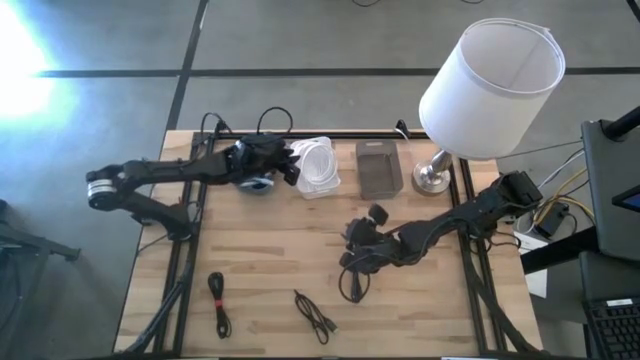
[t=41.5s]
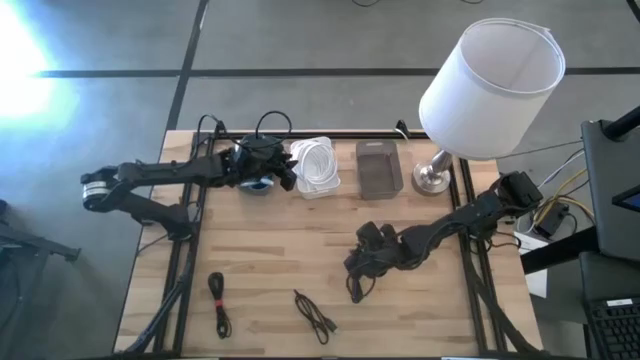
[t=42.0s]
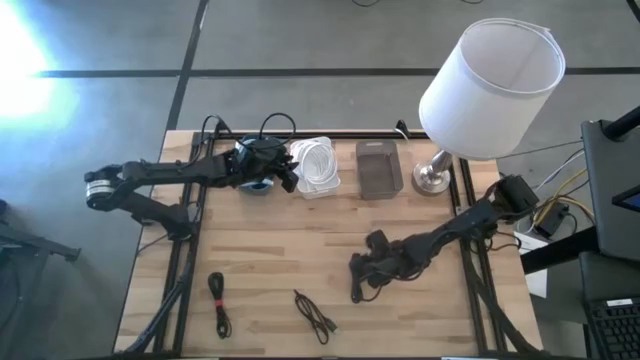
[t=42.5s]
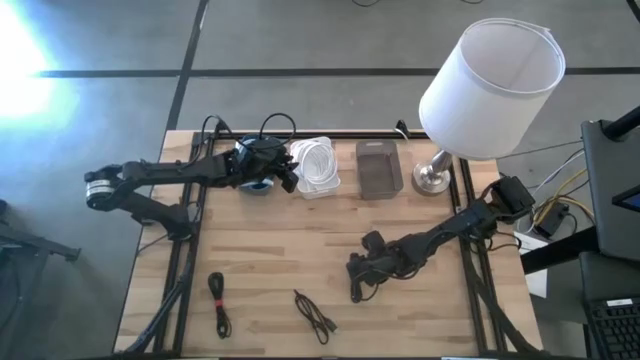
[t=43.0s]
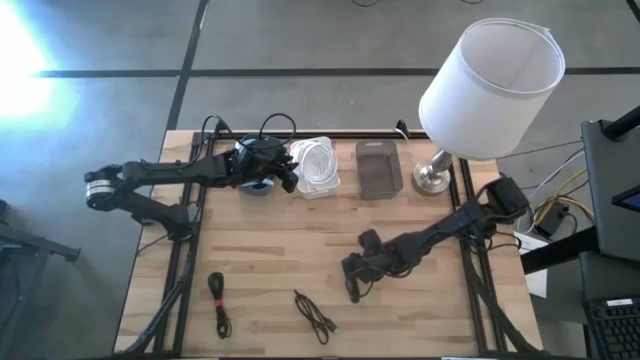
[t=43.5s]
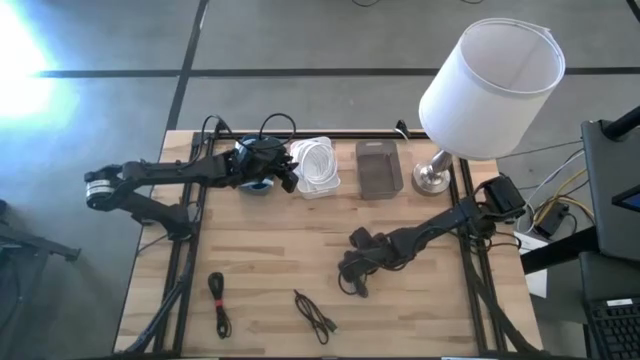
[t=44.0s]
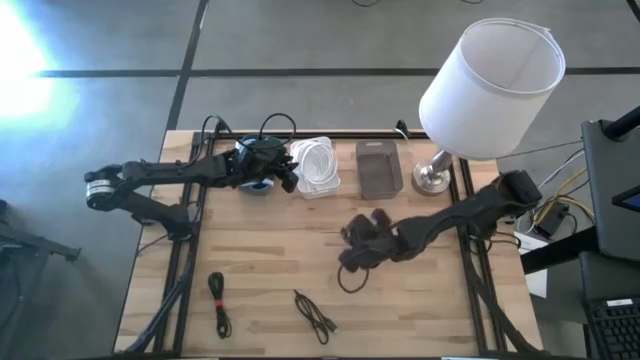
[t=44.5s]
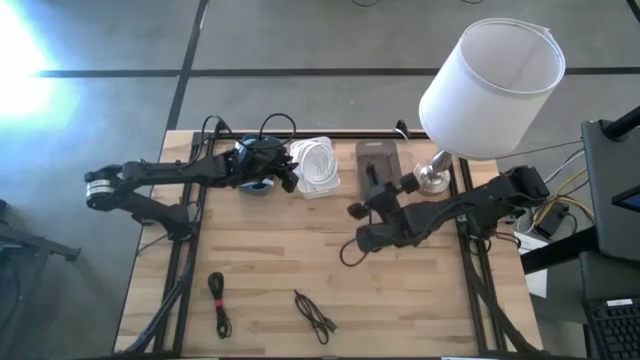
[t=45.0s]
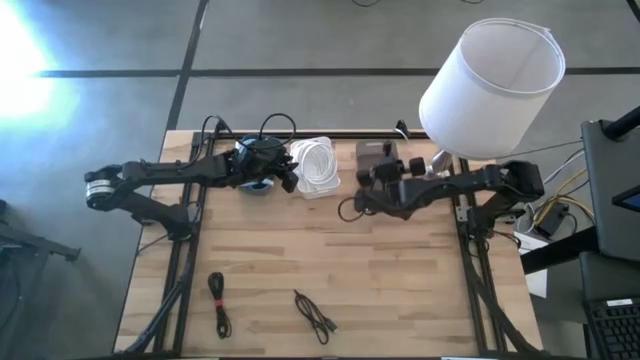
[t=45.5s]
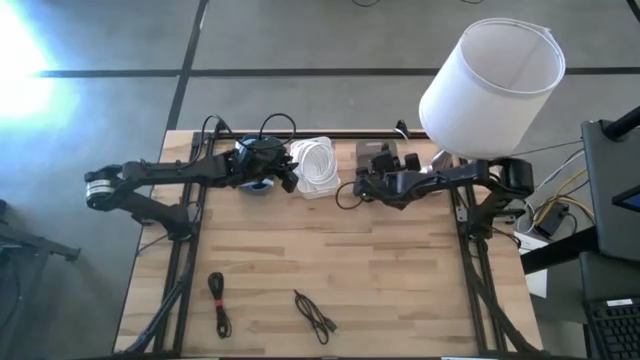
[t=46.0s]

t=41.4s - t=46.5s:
Task: Pick & Place USB Port
Put the right black USB cable into the black bin

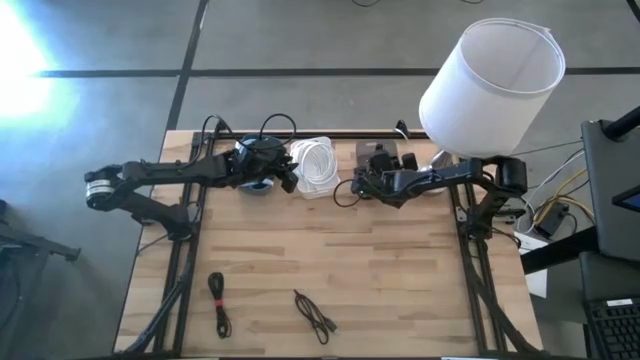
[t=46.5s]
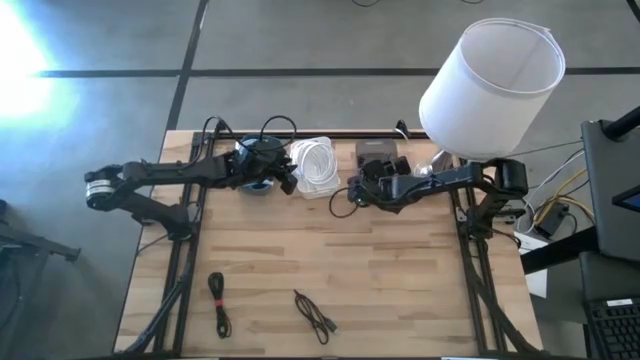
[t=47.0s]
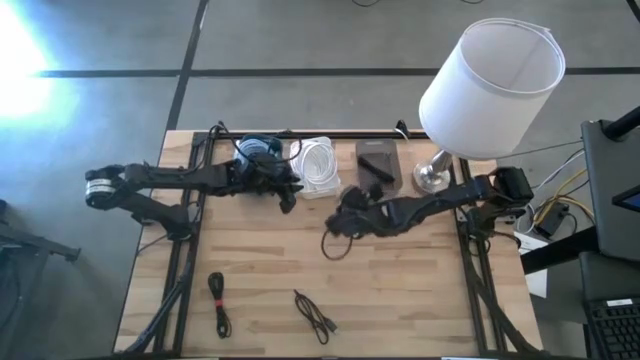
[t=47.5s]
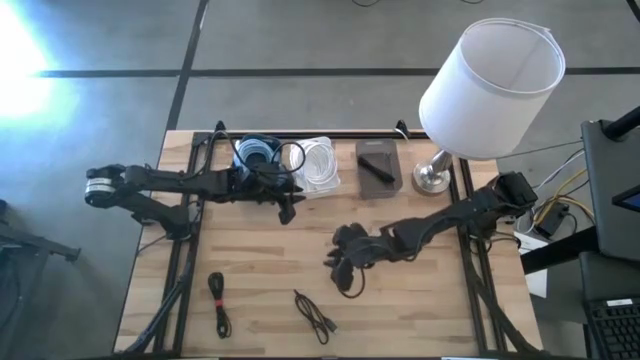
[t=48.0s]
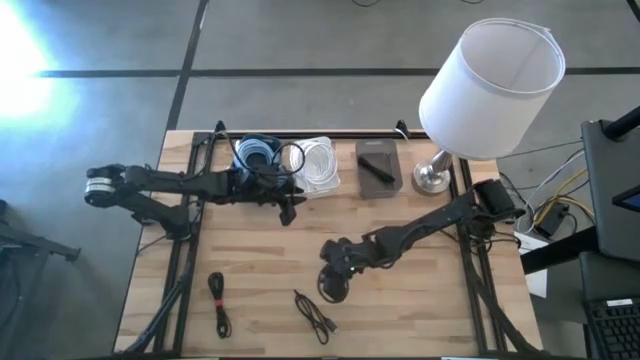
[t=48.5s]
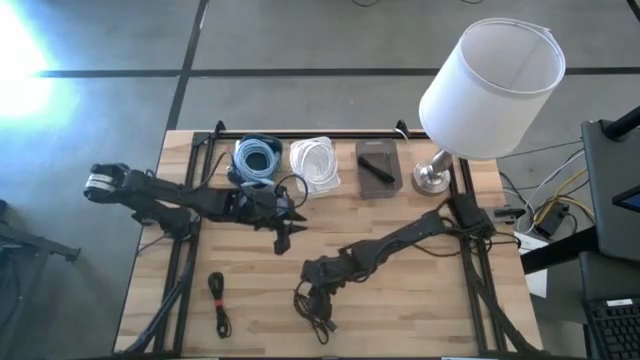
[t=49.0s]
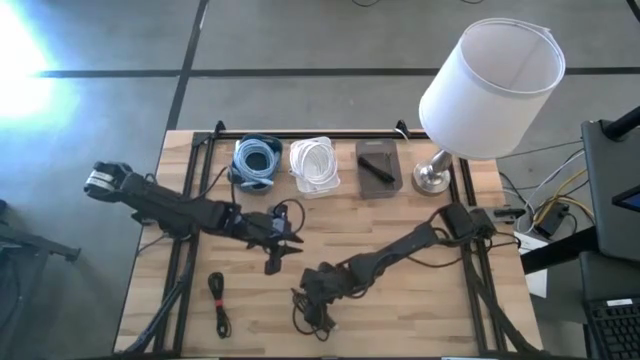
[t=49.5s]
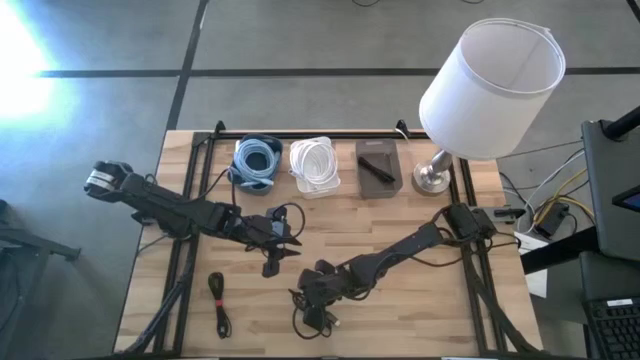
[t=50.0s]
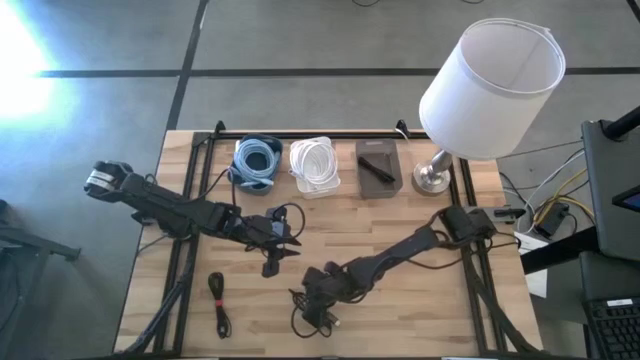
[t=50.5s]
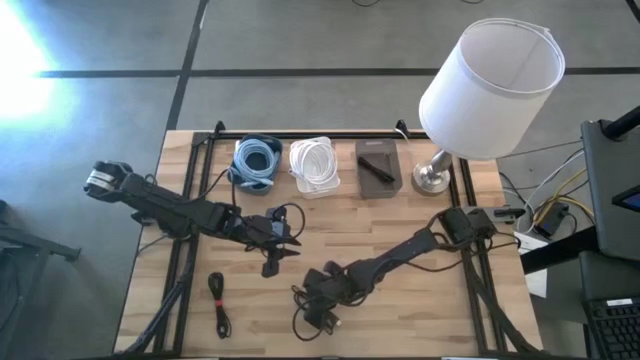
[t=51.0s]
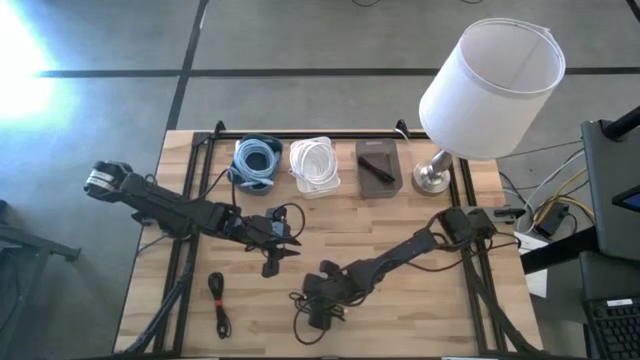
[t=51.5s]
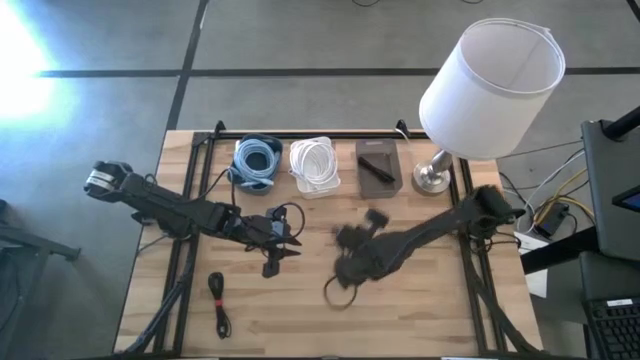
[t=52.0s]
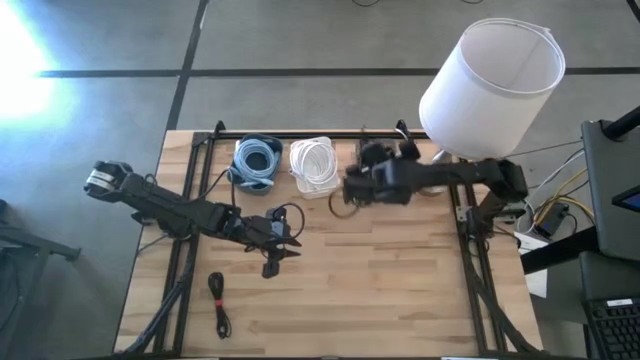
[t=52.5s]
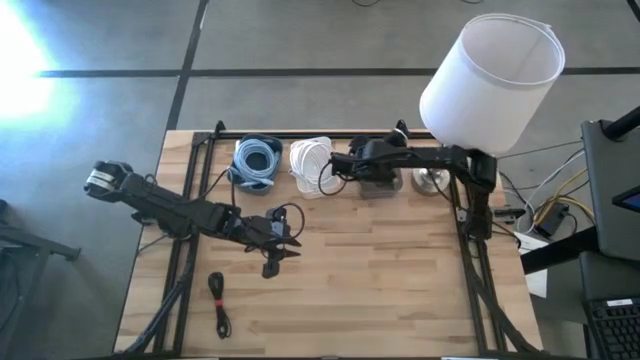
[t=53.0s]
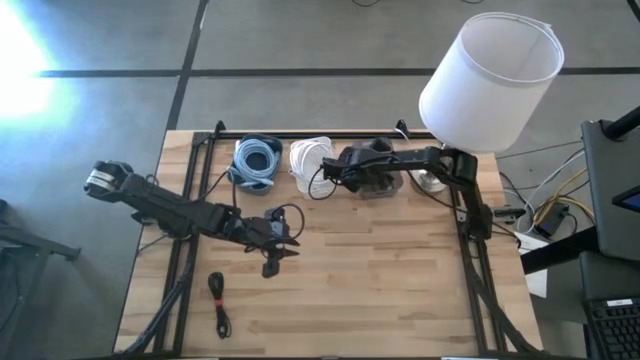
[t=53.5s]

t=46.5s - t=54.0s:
Put the left black USB cable into the black bin

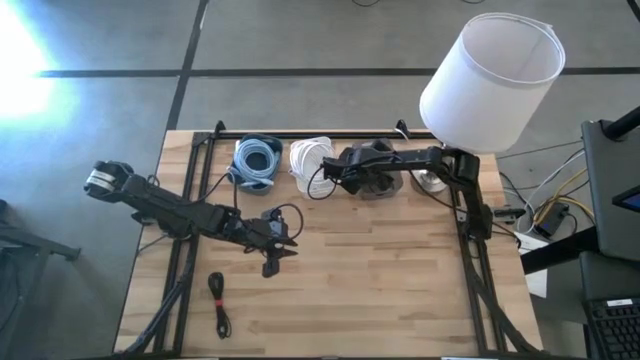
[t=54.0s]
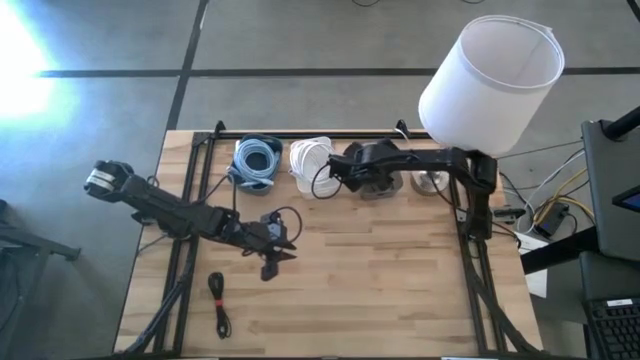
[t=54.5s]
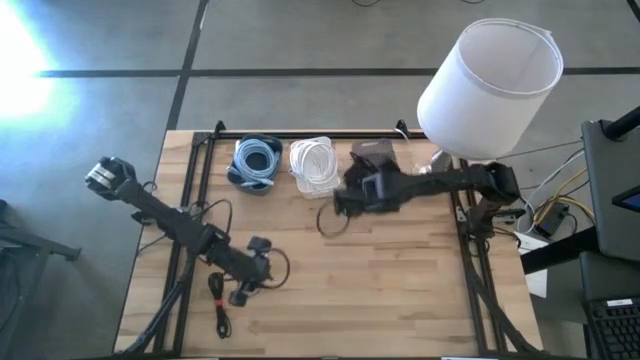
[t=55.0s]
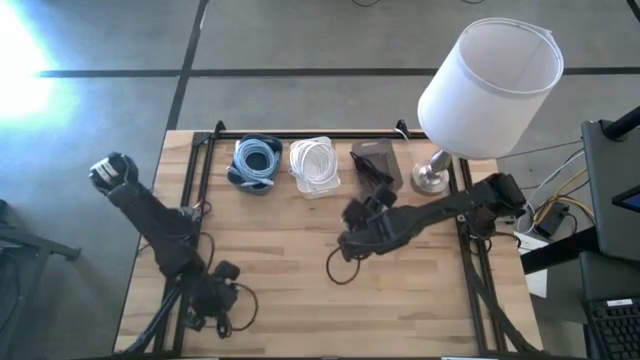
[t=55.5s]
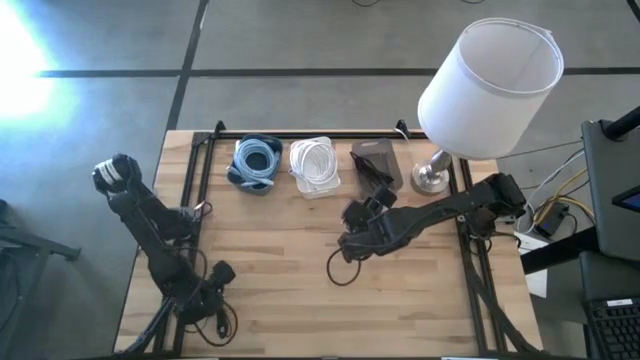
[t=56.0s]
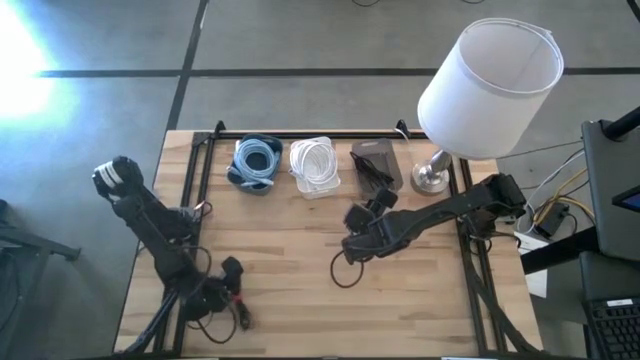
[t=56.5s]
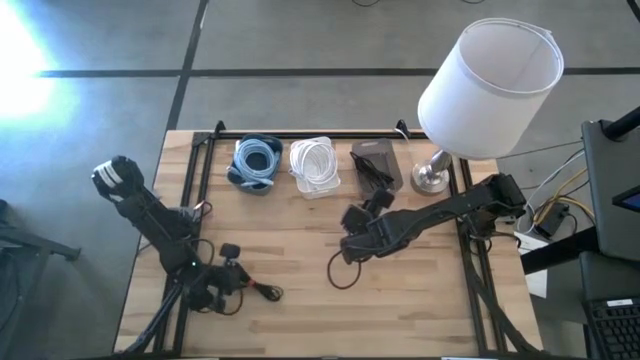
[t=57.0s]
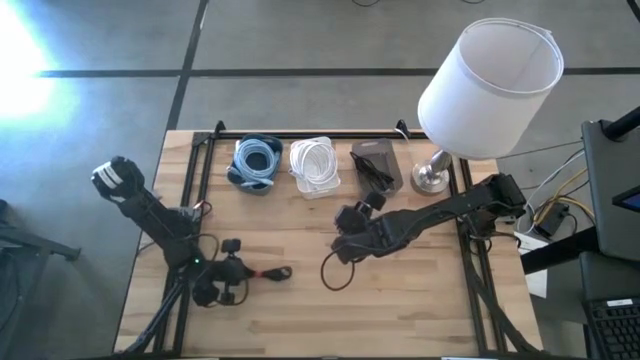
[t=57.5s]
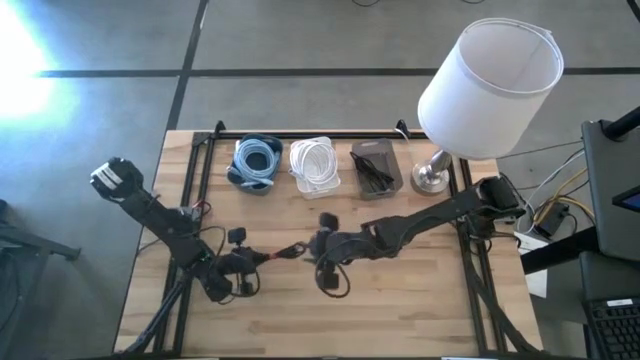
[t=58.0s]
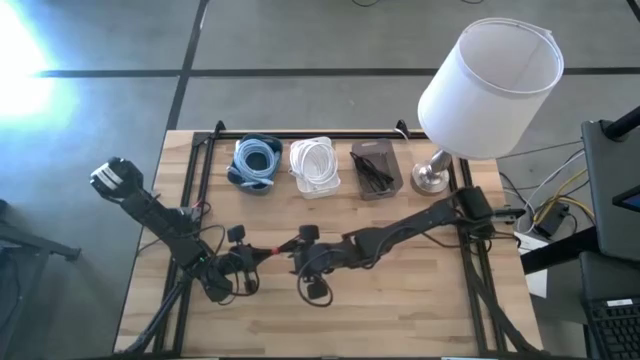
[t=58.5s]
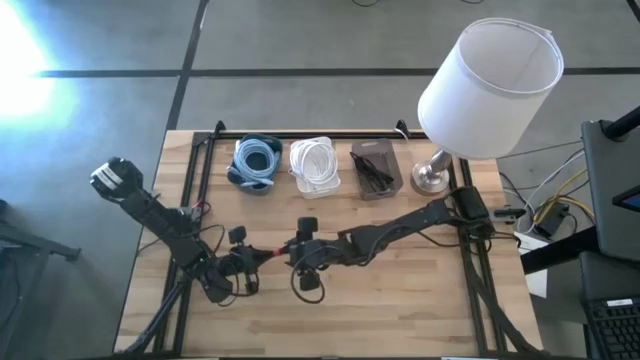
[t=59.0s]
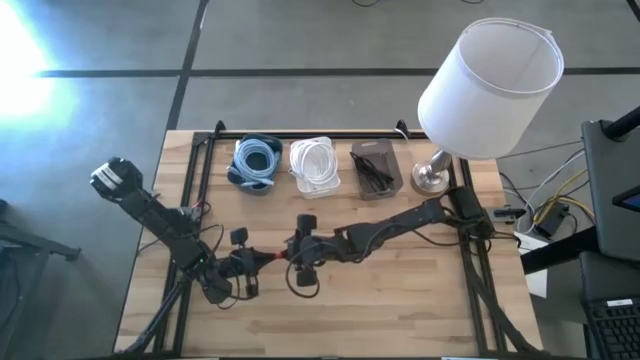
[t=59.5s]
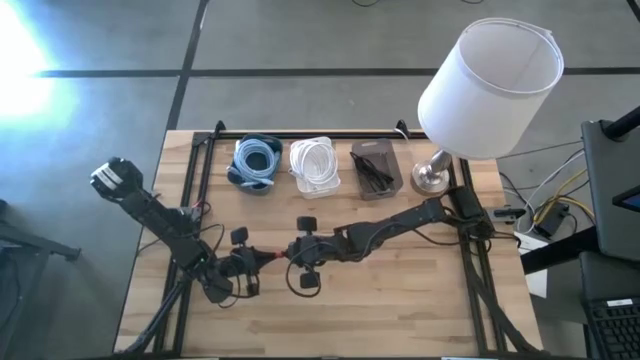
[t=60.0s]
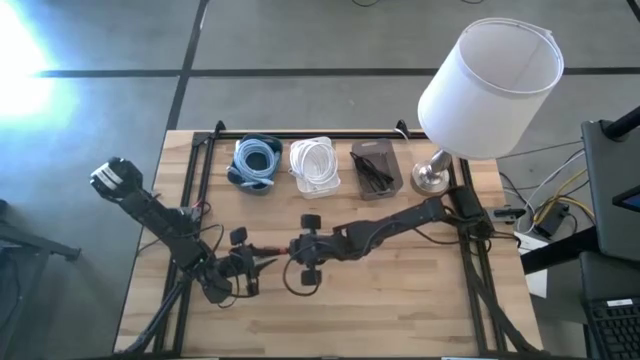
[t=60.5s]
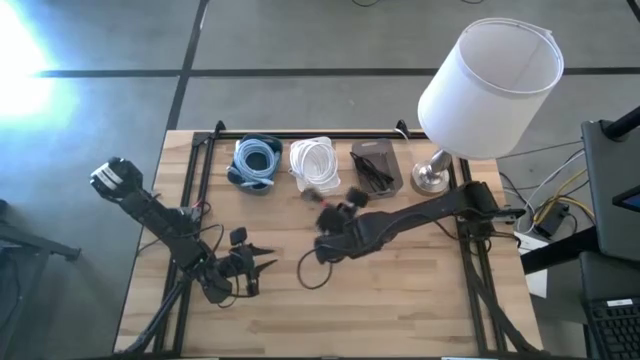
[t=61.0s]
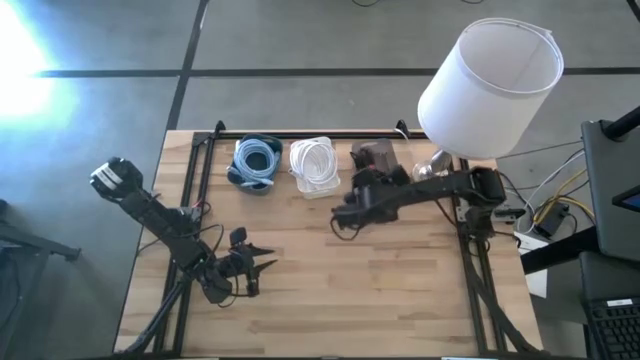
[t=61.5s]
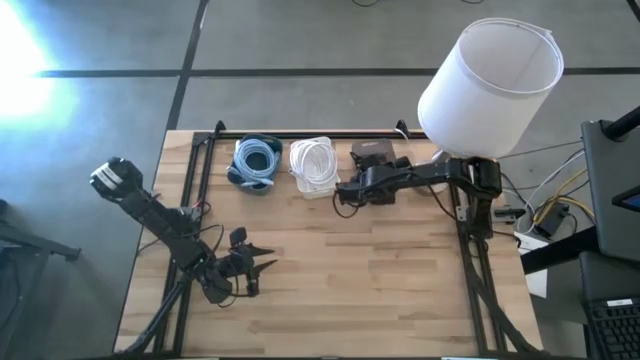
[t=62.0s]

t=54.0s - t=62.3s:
Put the black USB cable into the black bin
